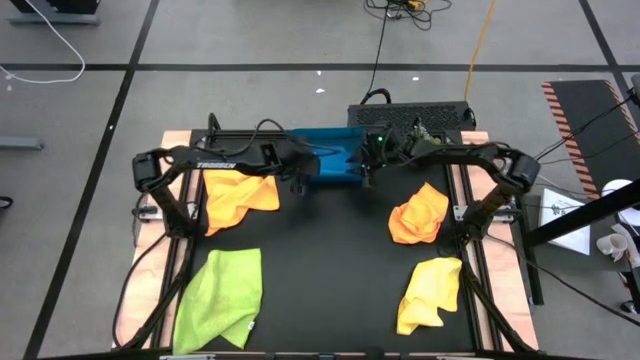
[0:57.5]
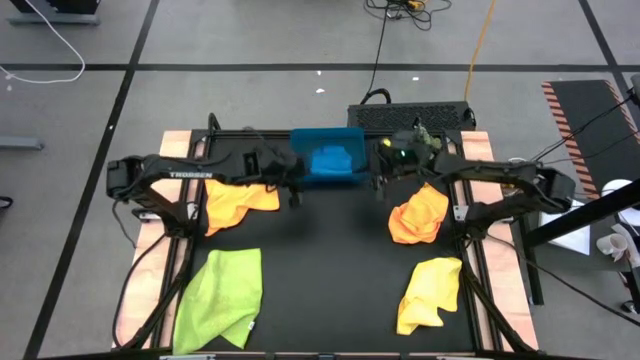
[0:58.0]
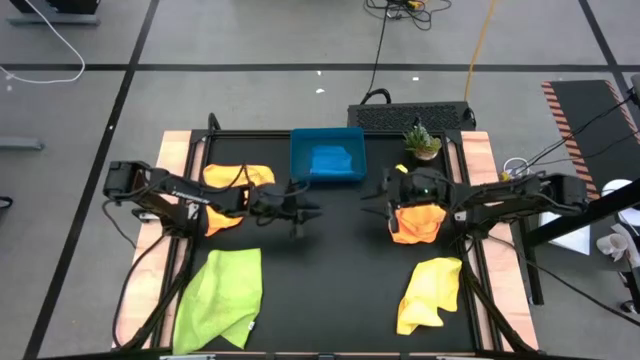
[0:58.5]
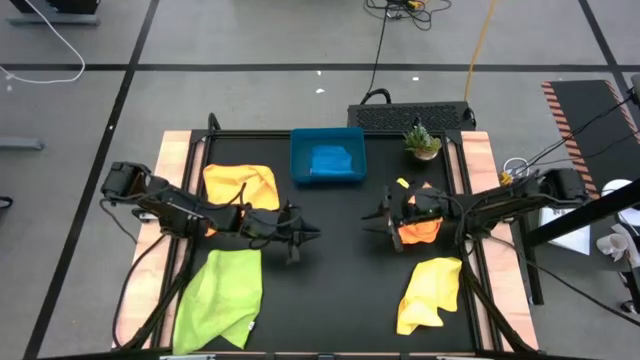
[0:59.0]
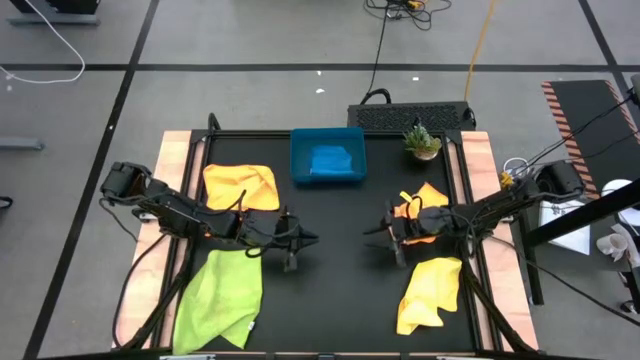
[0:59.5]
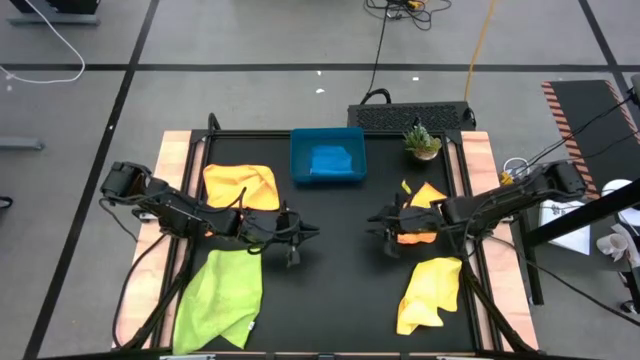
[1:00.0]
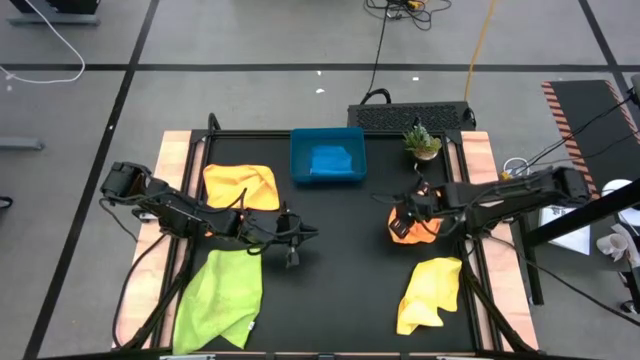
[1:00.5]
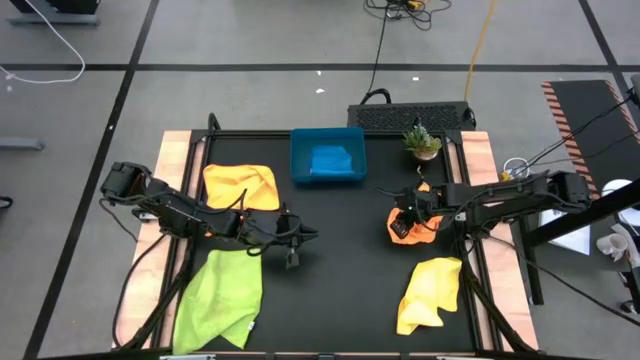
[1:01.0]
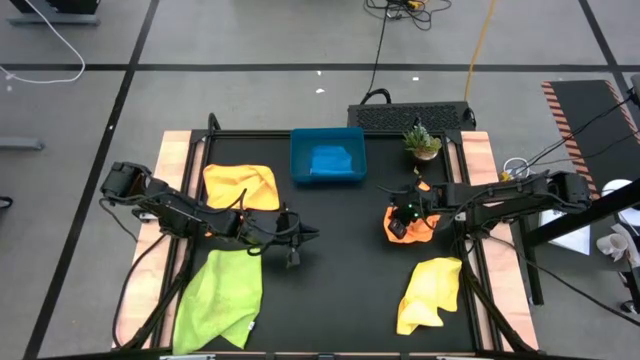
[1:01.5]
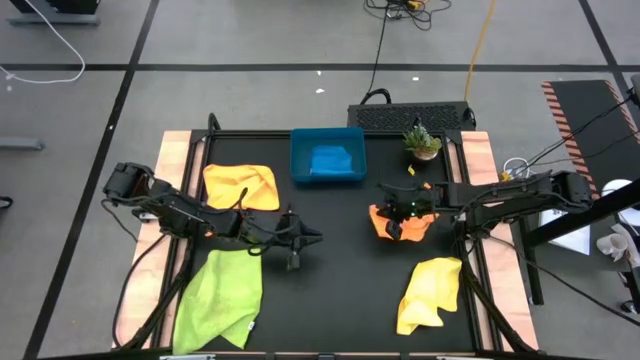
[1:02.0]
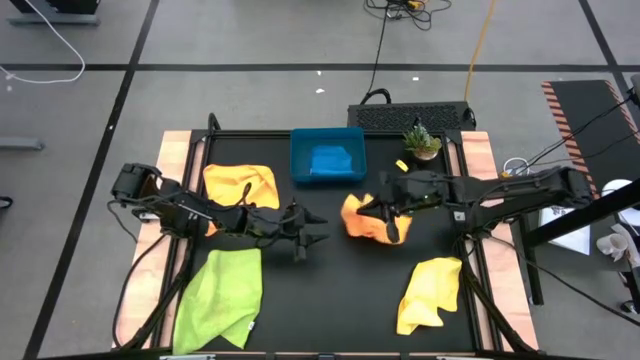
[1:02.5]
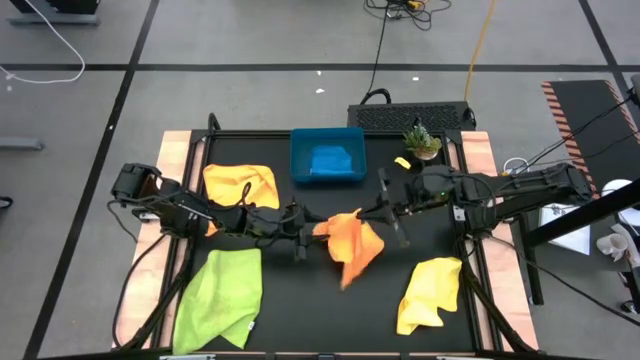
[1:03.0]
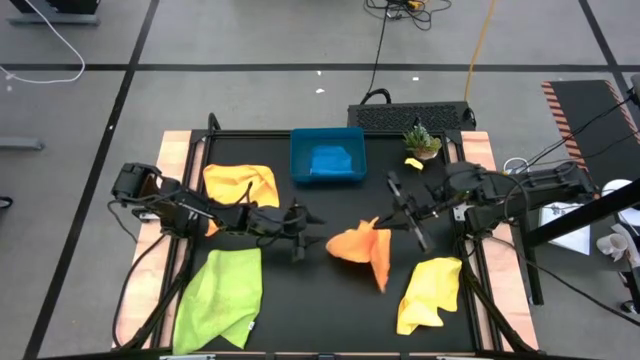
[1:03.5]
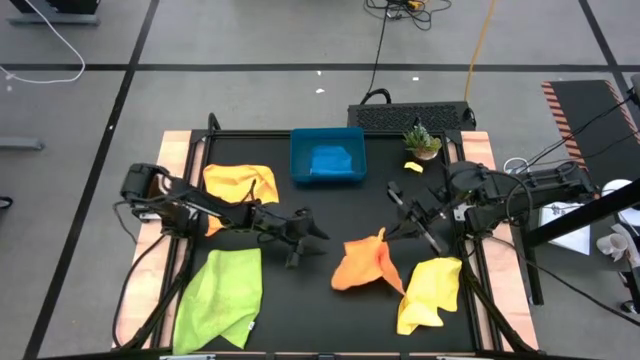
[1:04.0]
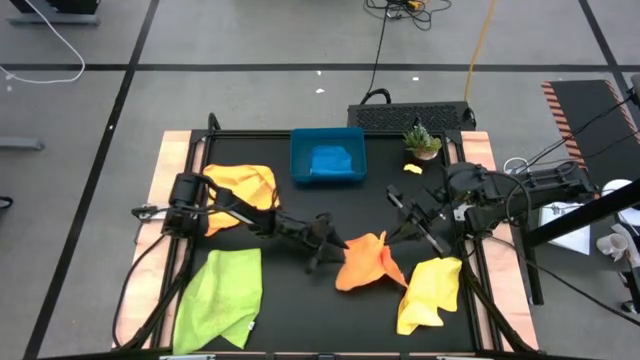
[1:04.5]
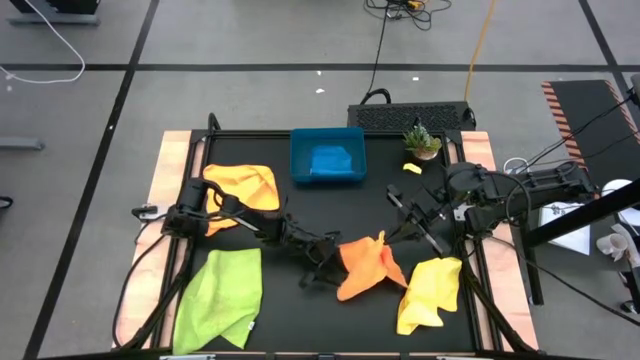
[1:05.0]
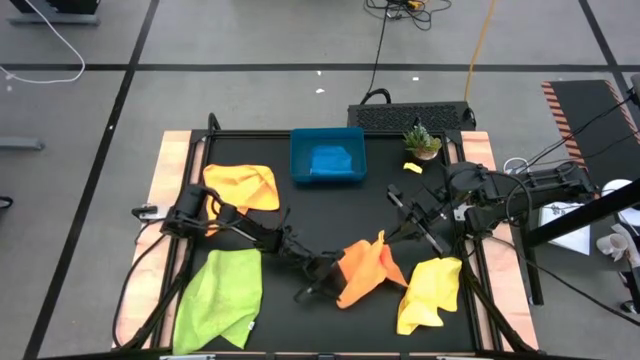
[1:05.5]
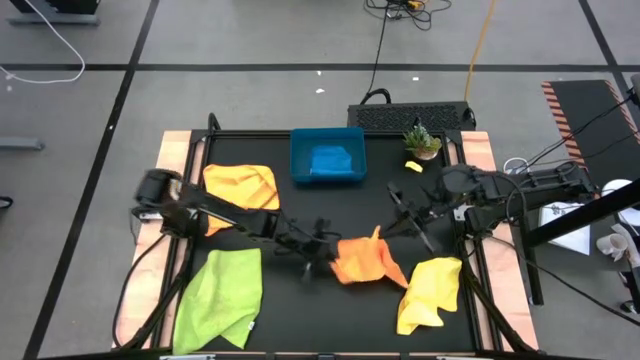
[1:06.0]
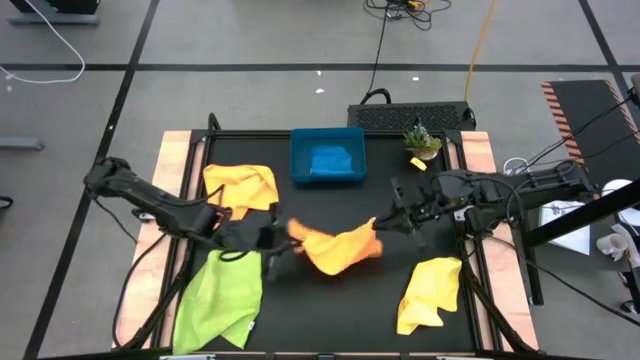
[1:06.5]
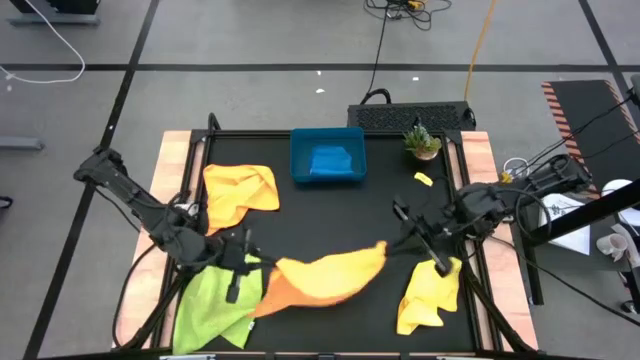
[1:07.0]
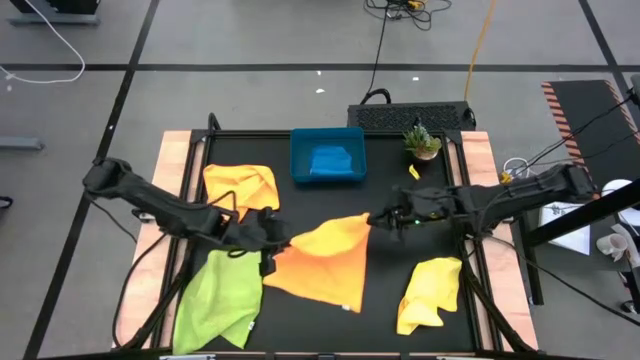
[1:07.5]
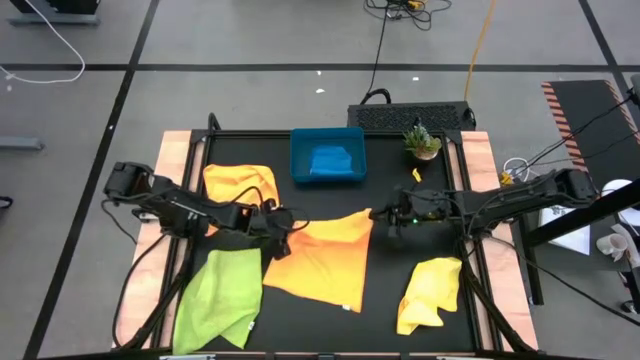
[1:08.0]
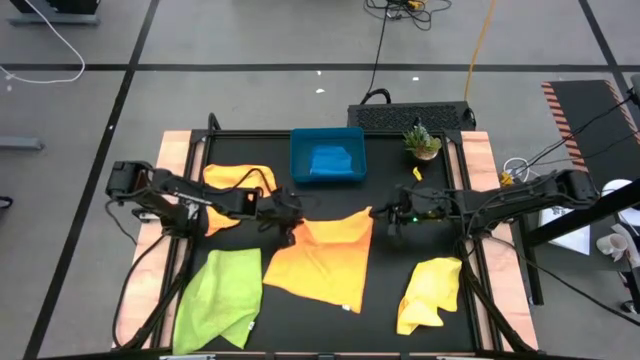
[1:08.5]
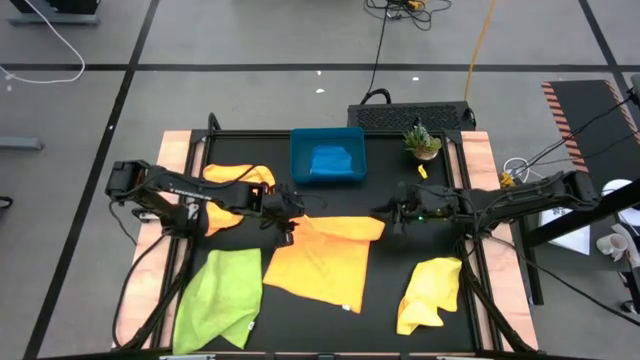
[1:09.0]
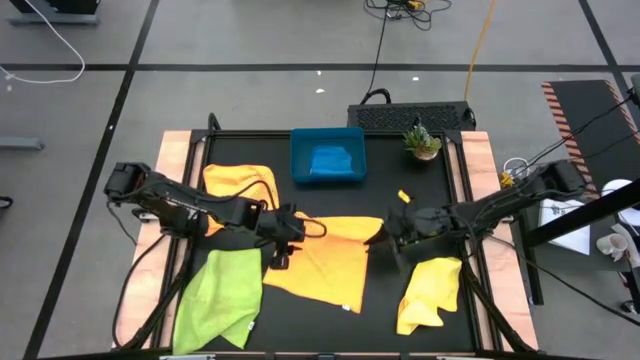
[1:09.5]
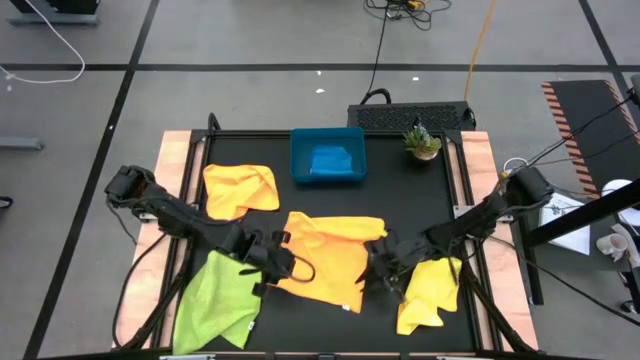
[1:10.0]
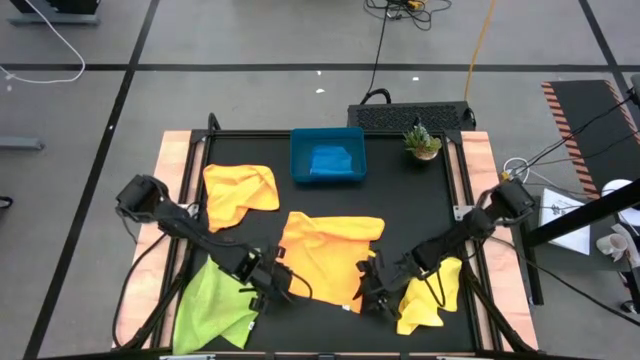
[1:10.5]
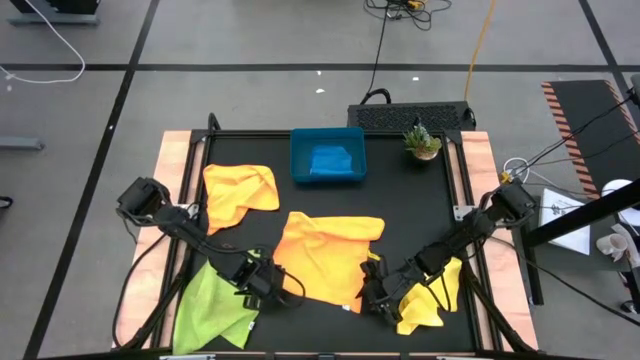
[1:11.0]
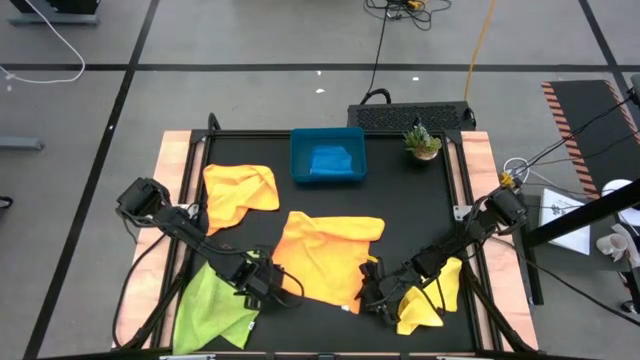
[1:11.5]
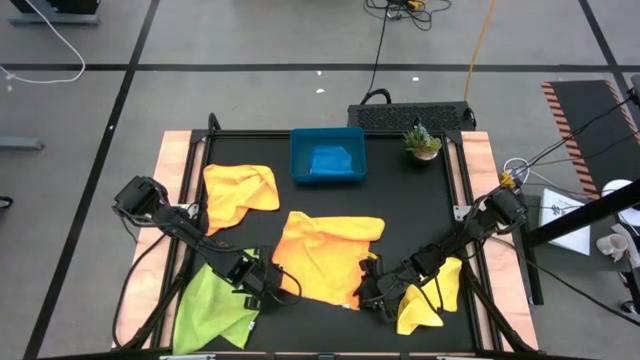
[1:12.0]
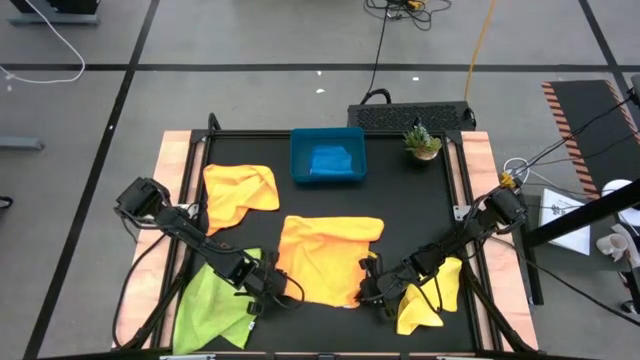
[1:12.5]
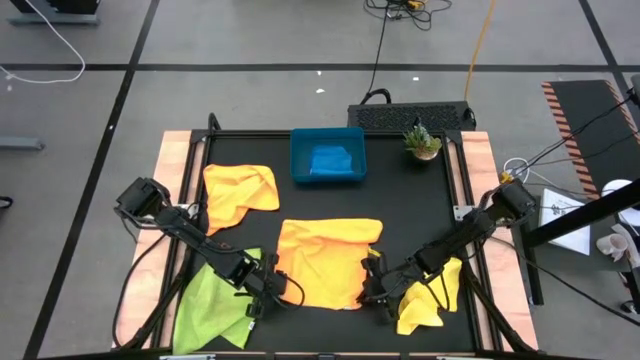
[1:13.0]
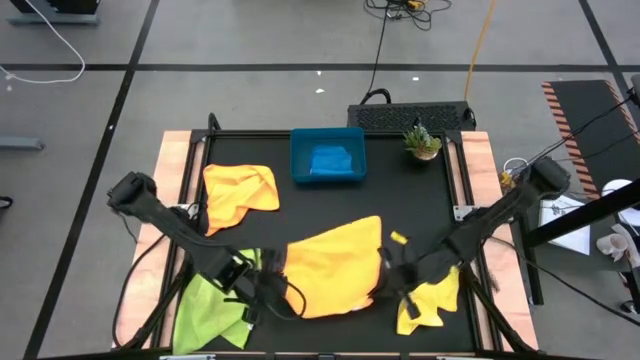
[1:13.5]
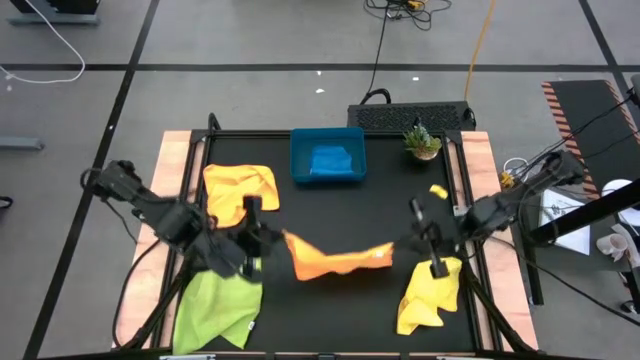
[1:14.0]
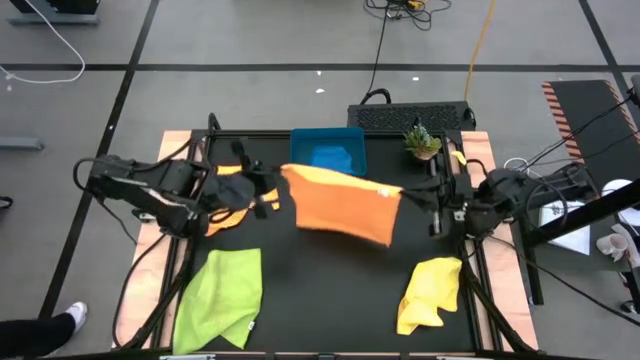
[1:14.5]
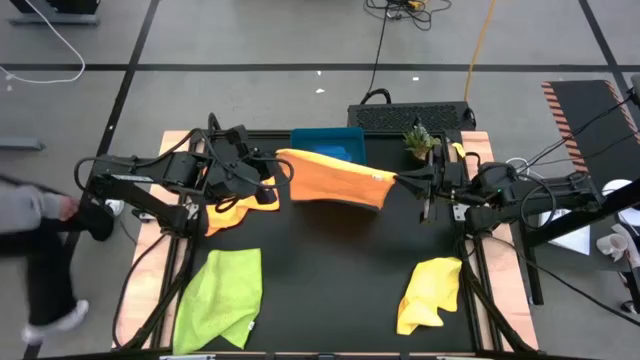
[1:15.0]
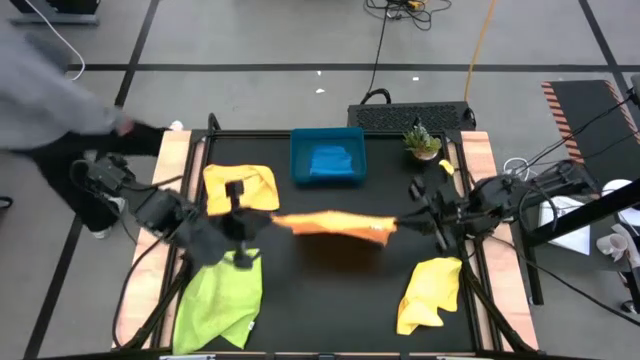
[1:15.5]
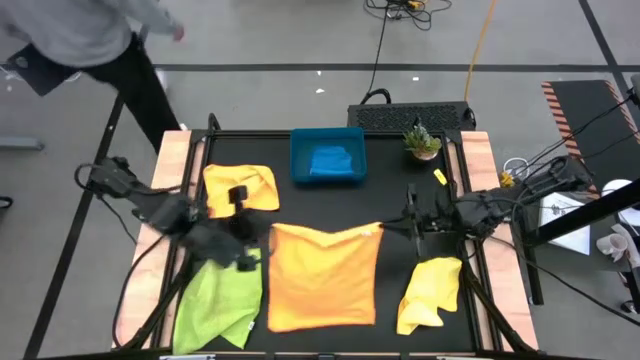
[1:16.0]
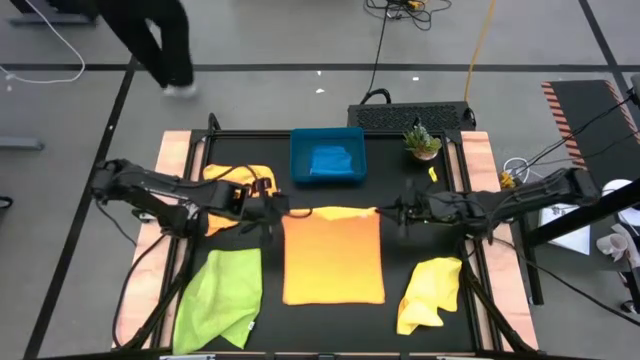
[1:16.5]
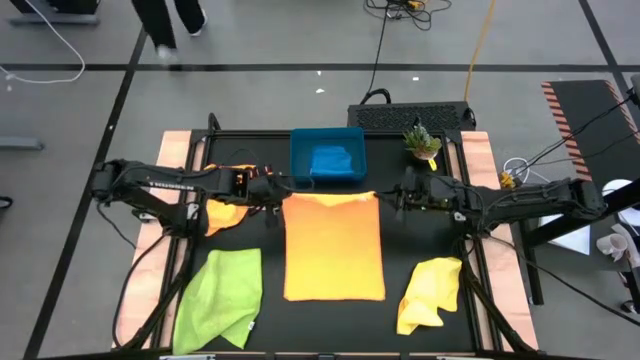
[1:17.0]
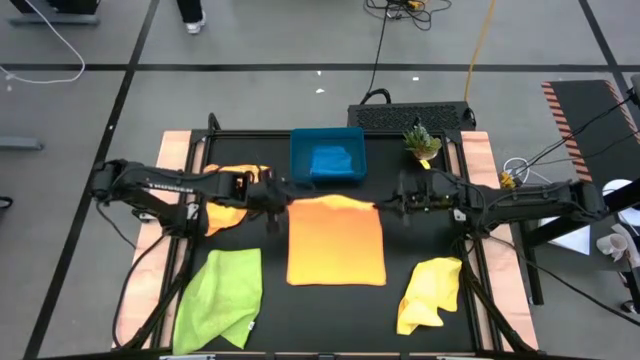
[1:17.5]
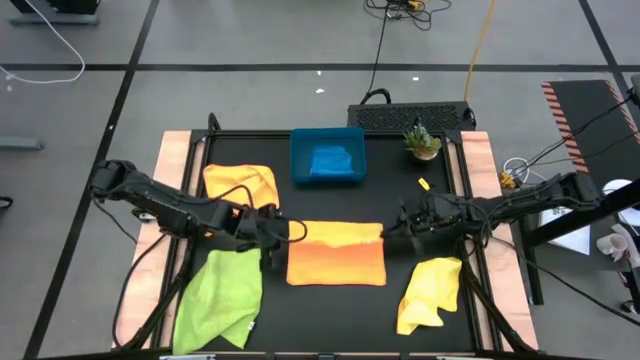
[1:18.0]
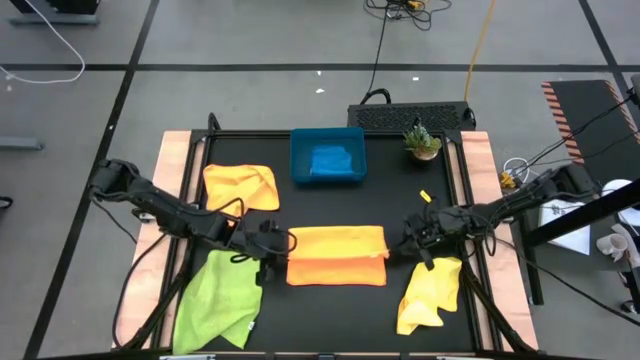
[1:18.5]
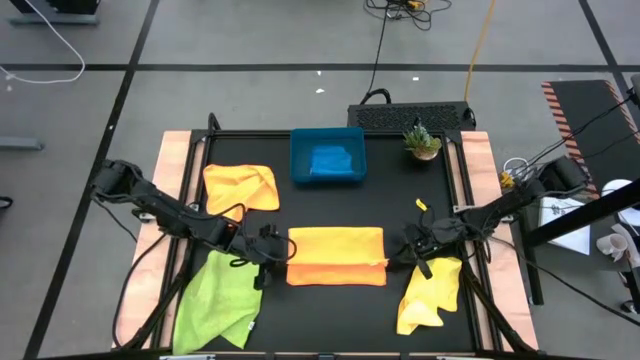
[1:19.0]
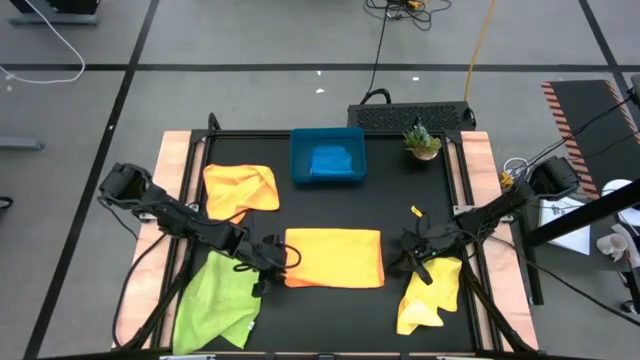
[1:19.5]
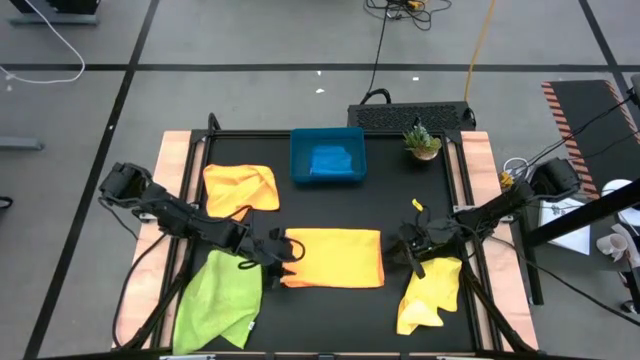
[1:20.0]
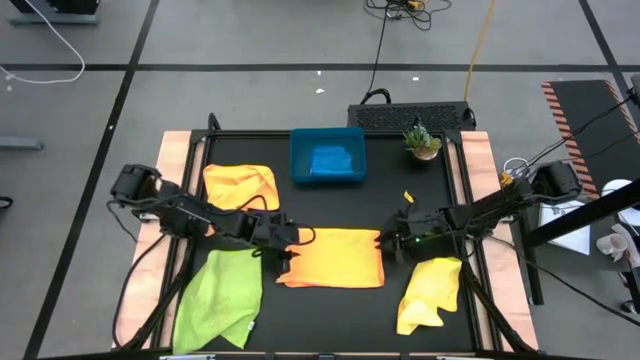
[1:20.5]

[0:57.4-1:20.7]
Task: Fold microfiber towels
Fold the right orange microfiber cloth
